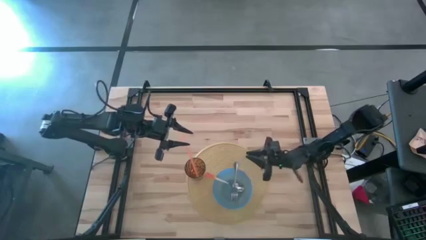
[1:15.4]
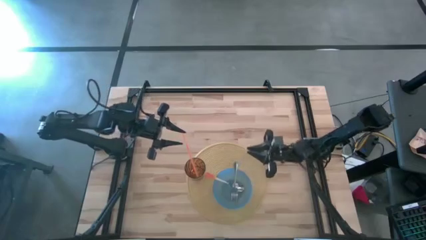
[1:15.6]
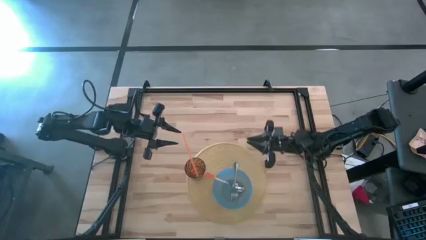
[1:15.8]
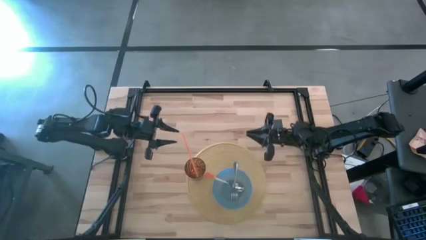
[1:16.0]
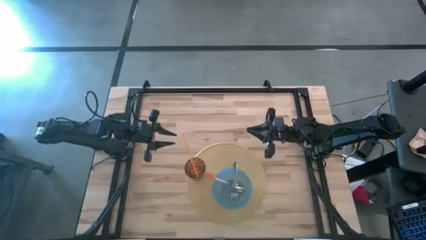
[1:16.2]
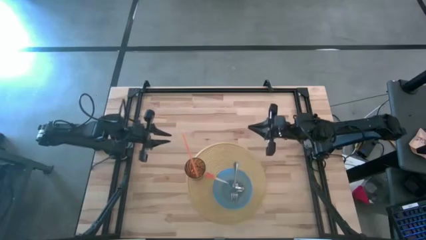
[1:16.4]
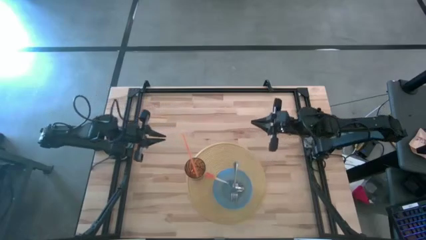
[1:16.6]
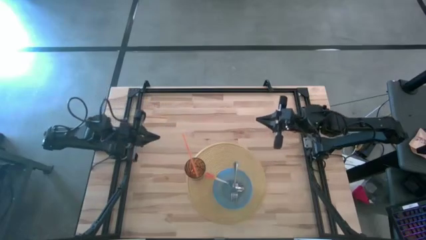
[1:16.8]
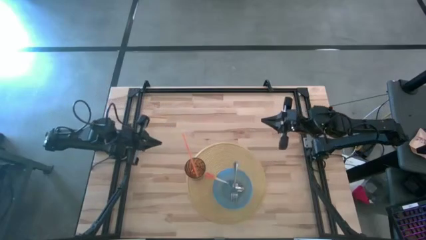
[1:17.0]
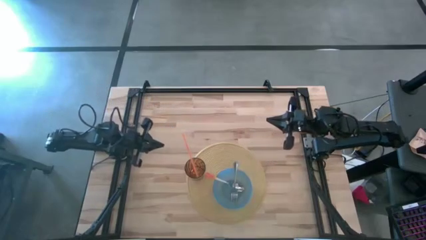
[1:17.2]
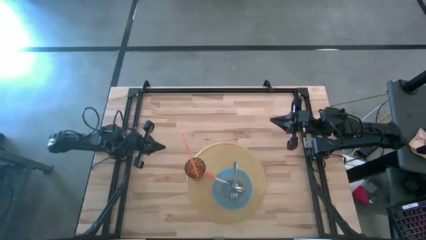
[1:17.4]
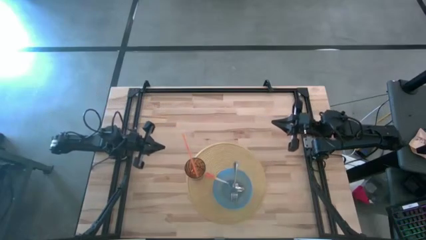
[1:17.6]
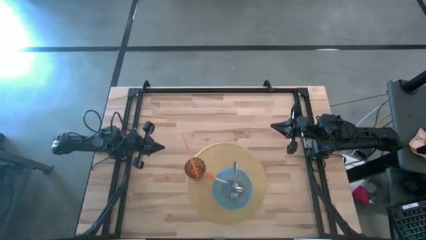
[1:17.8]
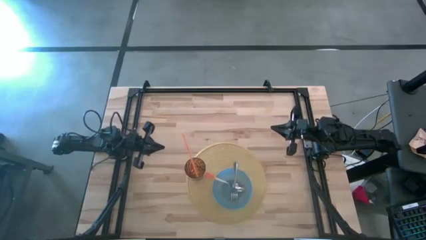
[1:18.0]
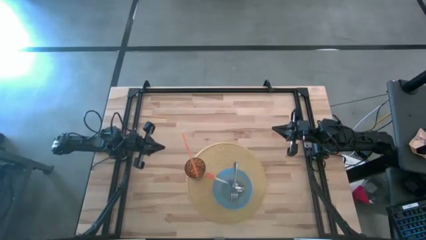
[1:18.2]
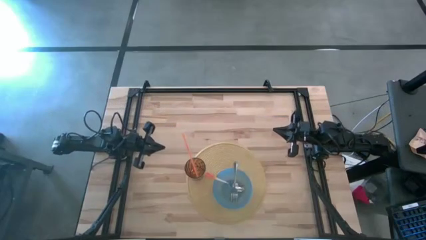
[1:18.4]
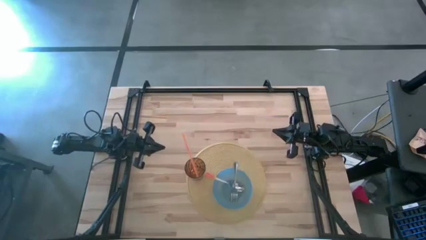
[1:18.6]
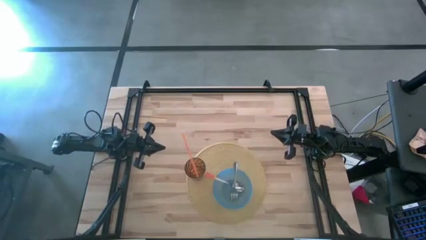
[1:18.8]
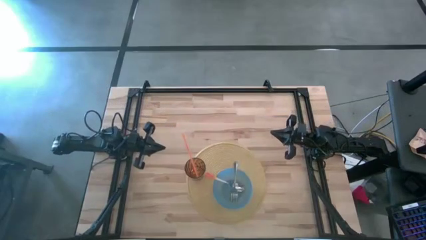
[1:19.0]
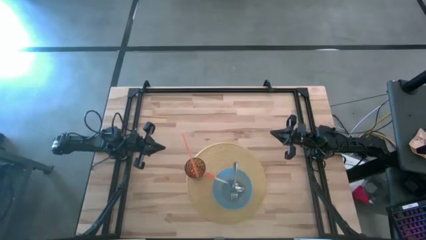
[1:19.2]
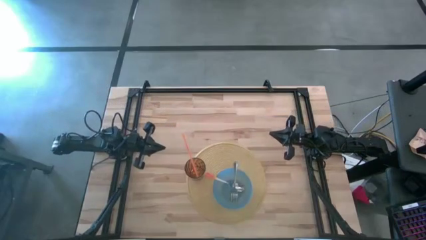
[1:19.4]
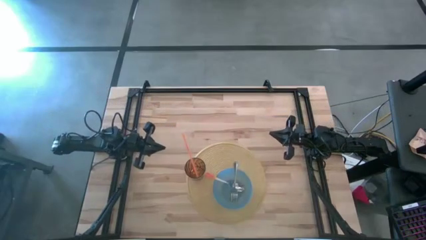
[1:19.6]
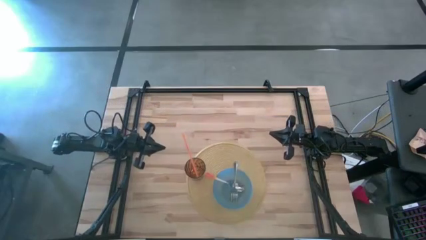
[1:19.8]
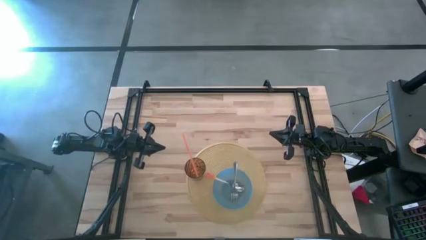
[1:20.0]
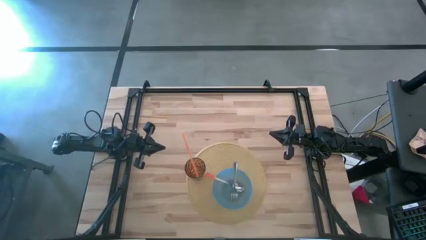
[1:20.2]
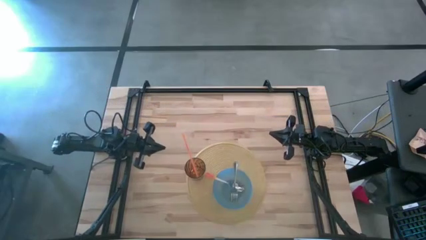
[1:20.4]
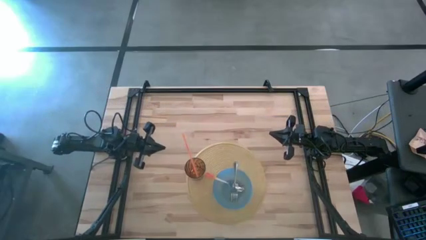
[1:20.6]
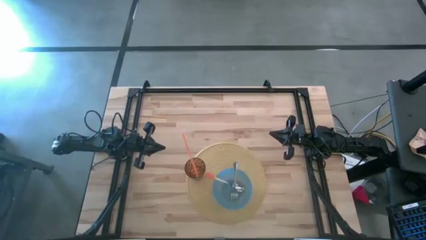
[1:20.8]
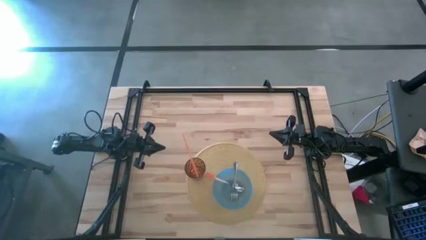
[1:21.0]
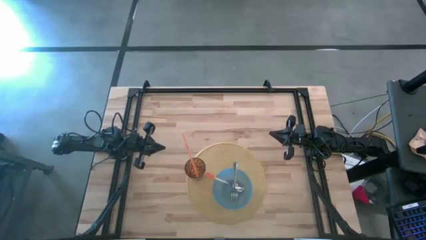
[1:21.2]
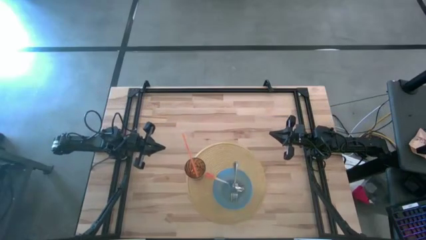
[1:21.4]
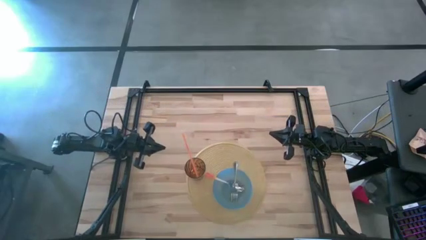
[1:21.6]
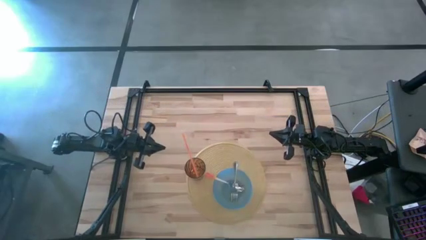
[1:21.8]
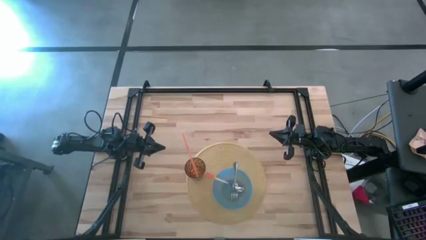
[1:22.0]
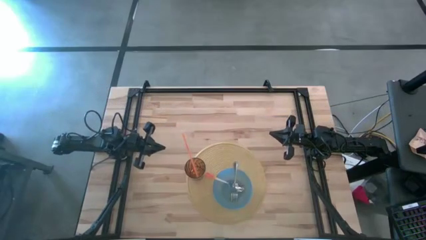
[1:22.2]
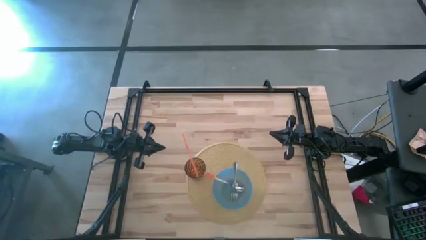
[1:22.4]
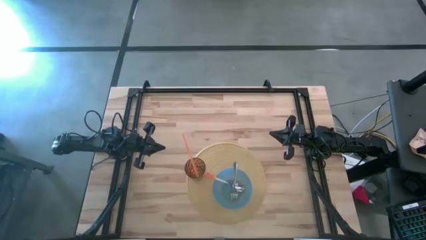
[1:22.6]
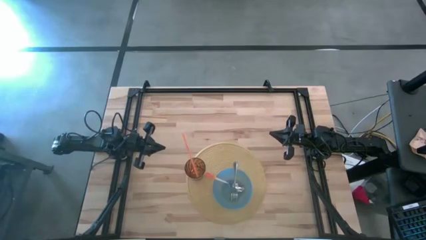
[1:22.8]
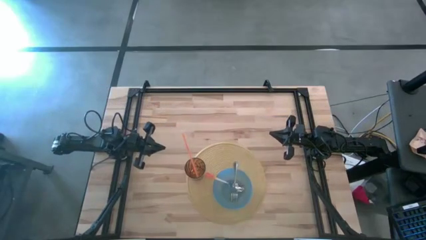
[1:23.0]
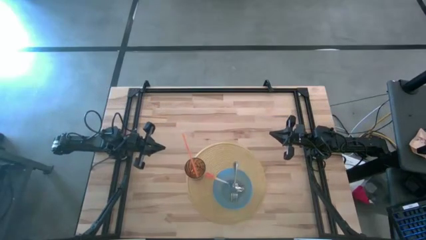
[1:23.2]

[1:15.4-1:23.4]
Task: Pick & Place Utensil
Return to Home Position

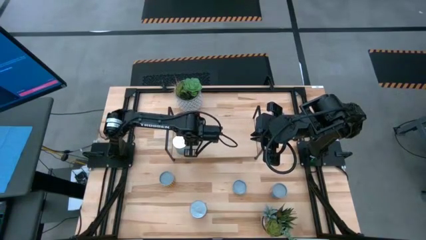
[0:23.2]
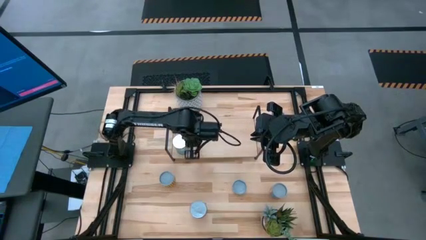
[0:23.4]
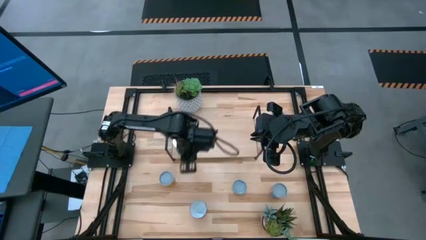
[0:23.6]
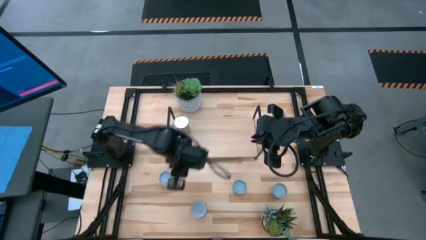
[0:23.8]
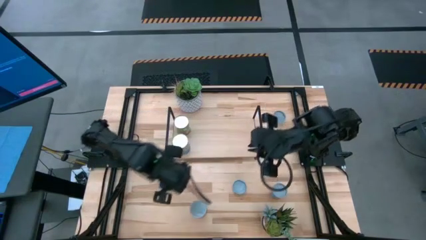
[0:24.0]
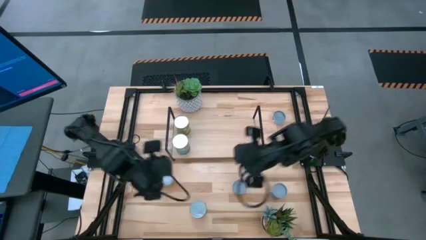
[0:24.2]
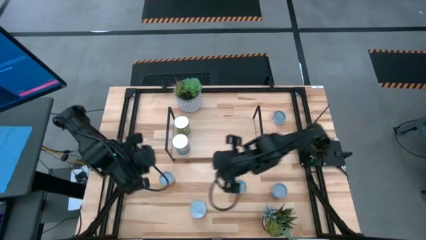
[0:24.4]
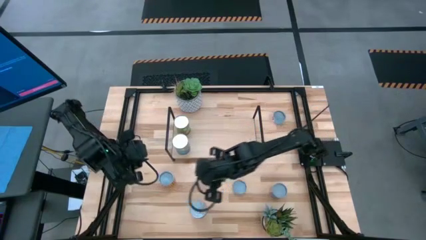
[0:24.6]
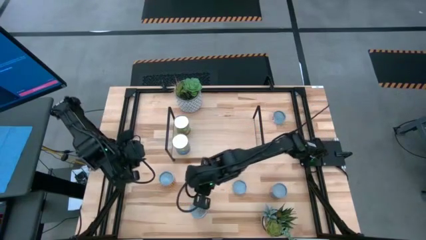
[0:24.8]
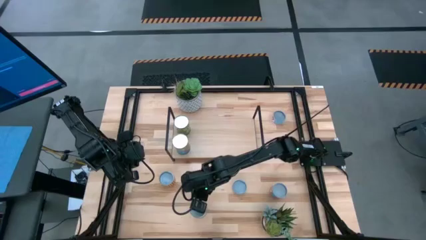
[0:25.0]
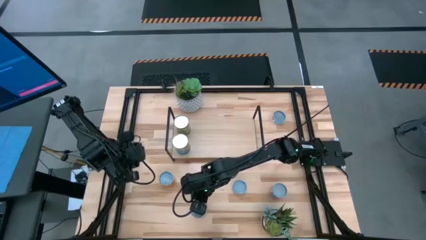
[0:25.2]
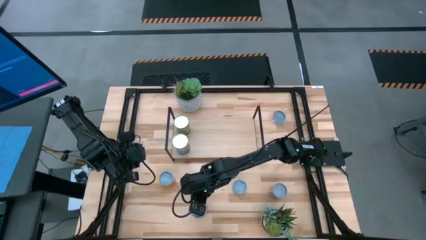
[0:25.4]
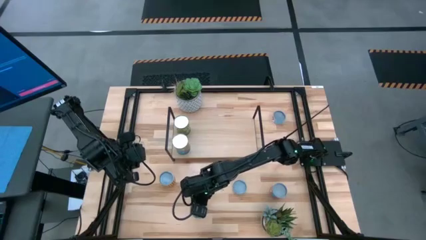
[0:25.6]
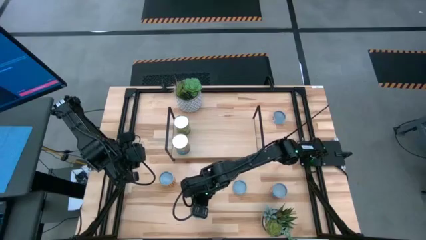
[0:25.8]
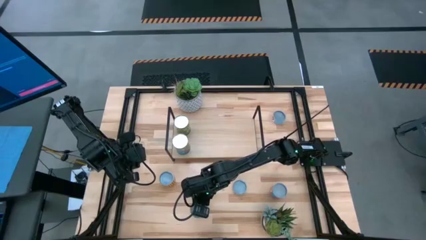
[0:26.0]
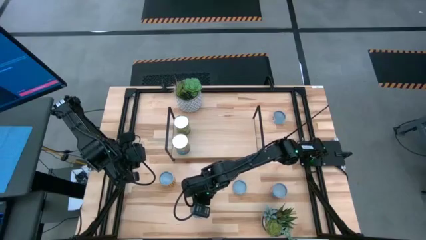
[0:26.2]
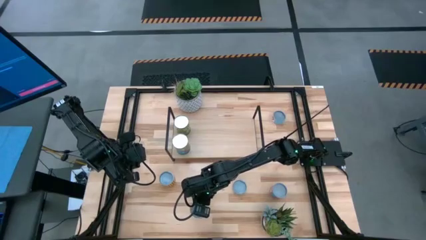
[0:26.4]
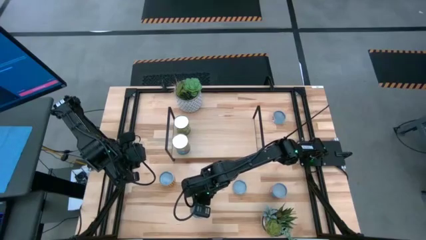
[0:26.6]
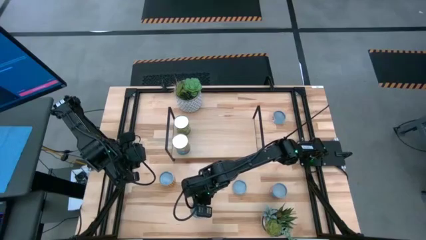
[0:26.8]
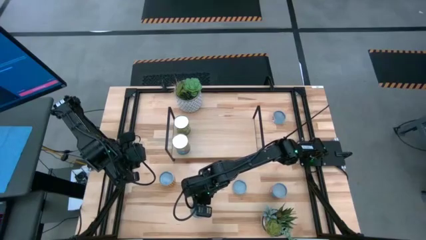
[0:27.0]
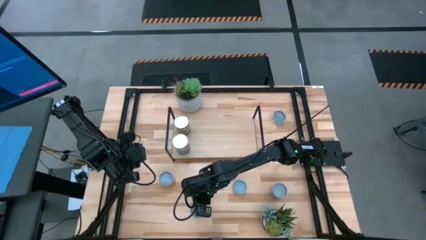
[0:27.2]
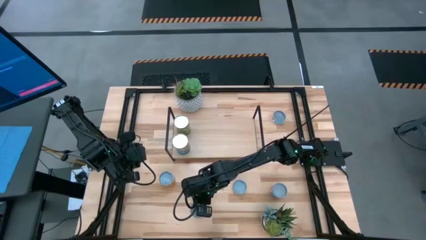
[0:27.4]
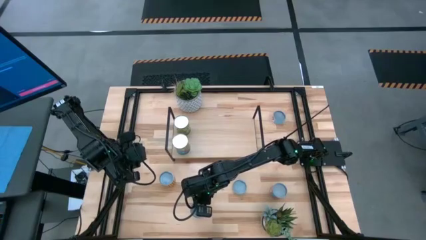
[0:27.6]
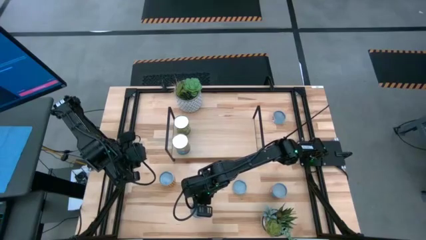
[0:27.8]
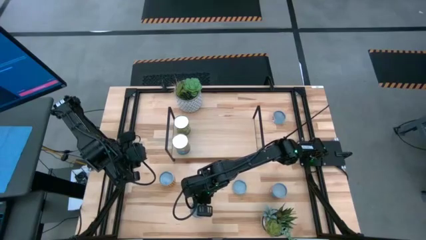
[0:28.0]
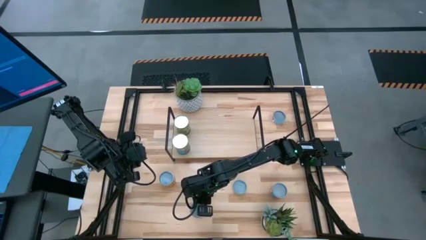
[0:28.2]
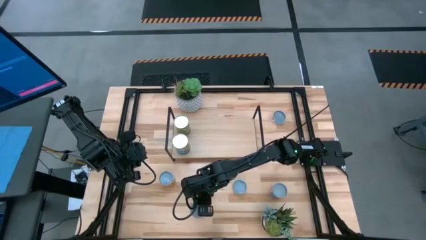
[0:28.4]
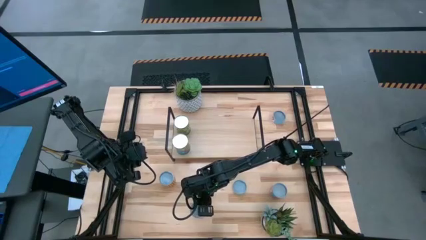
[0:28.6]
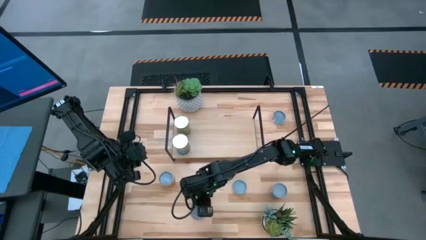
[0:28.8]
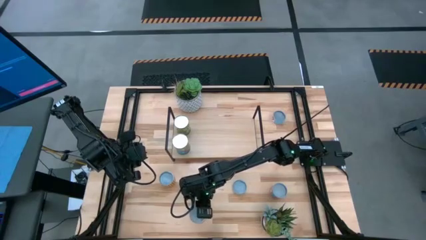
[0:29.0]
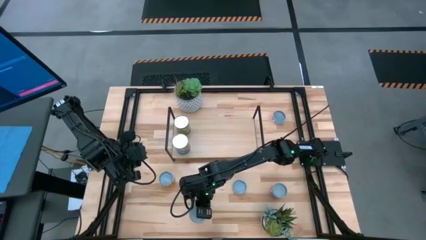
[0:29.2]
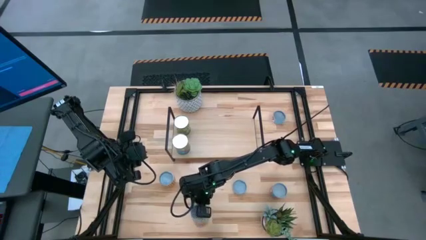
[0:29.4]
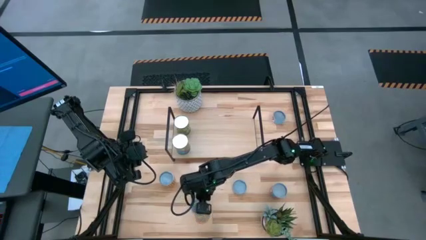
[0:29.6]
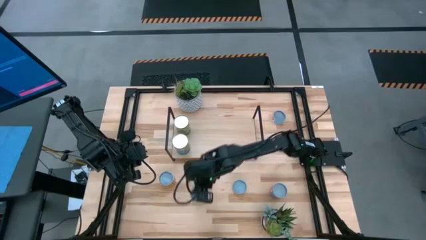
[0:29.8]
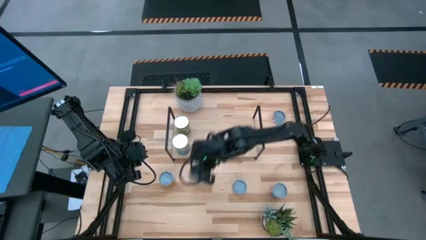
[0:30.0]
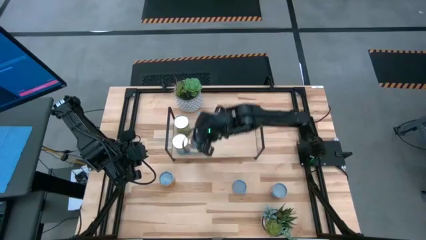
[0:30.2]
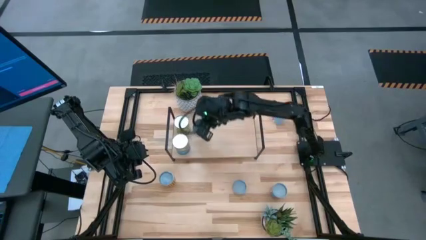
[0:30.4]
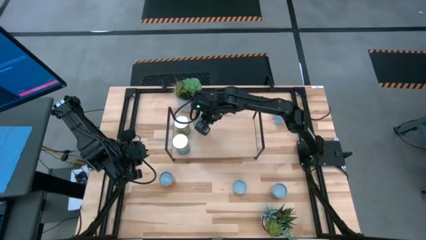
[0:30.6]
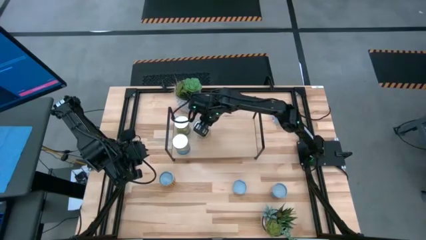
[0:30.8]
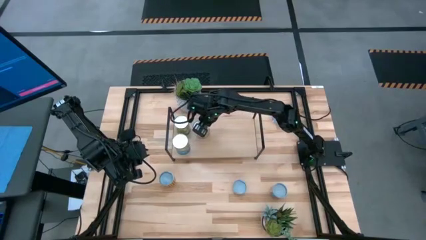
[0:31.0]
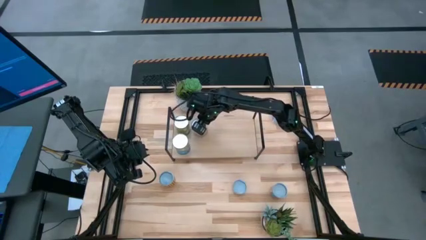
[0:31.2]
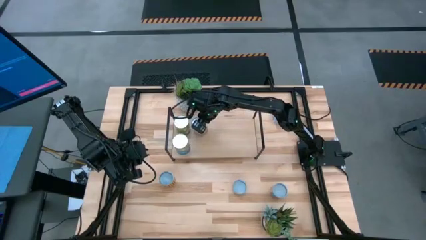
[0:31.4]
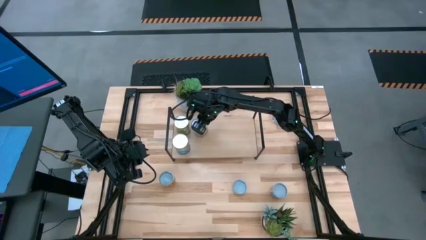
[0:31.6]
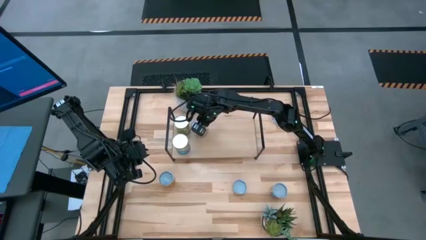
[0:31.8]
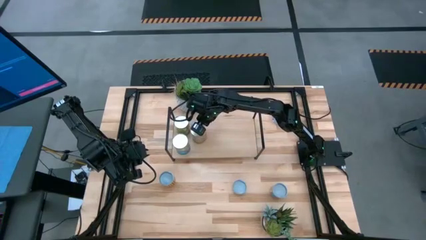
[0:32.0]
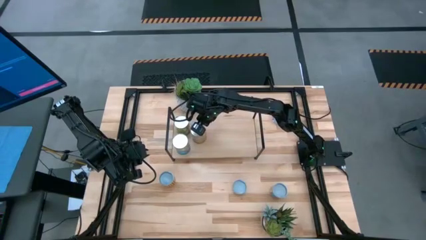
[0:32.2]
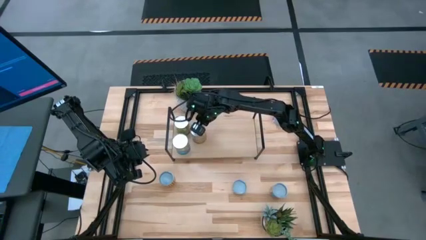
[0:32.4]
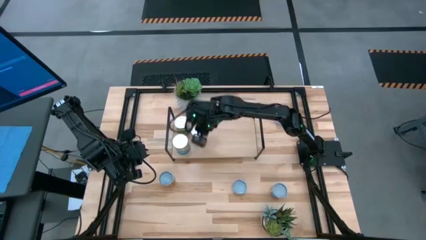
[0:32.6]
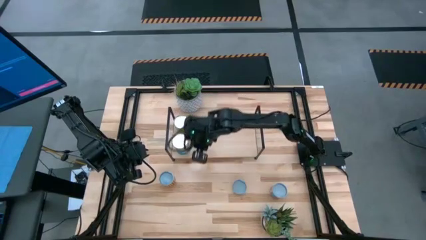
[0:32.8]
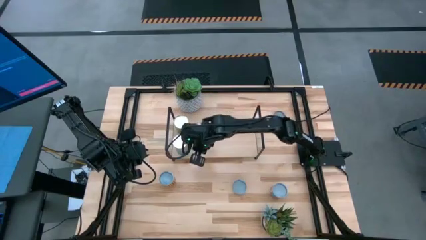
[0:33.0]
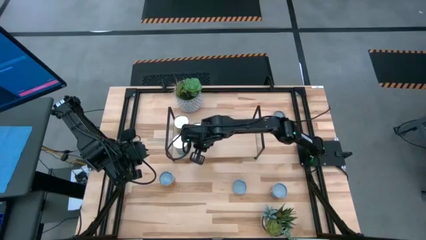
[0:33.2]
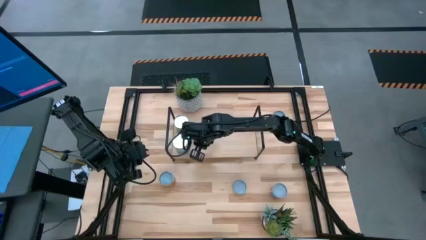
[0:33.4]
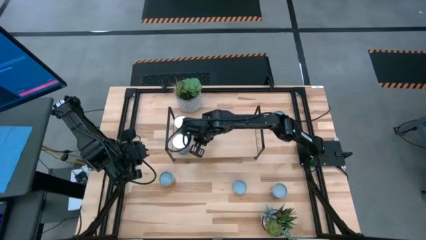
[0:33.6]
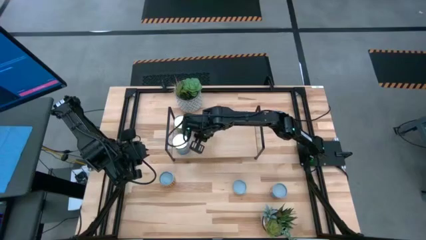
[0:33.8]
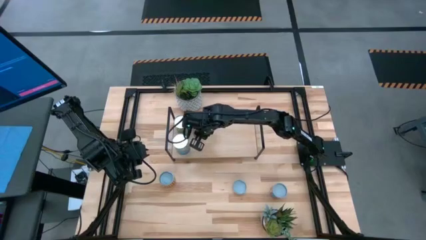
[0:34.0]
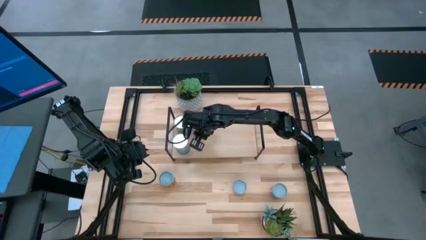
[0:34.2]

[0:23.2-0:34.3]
Task: Pick and place cans onto a shelf
Put the canned green beans on the shelf
